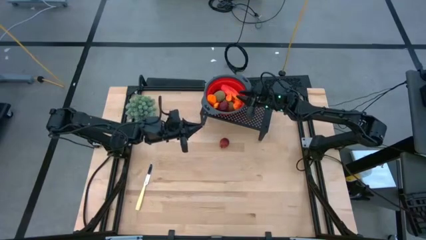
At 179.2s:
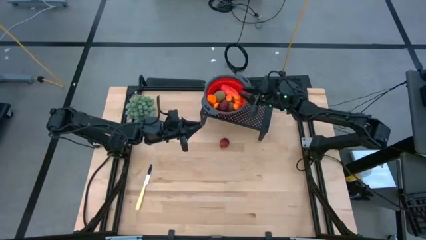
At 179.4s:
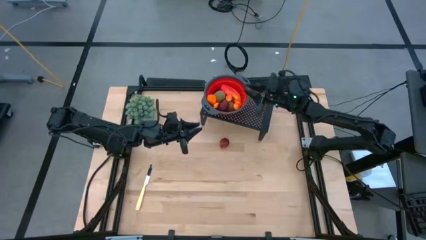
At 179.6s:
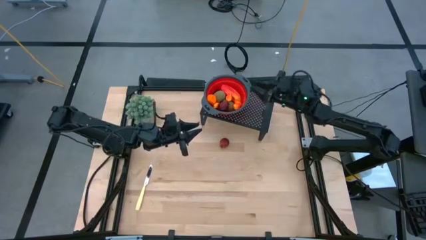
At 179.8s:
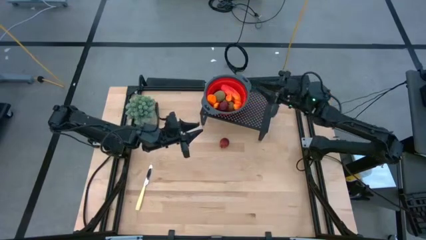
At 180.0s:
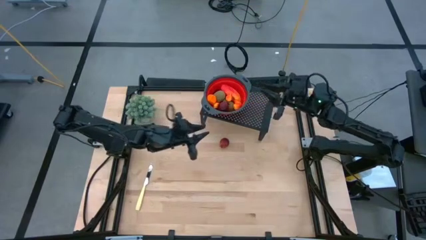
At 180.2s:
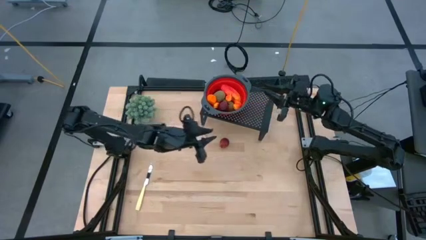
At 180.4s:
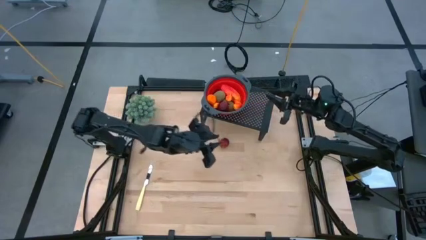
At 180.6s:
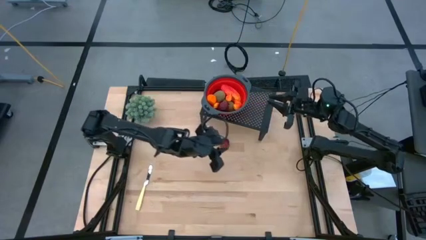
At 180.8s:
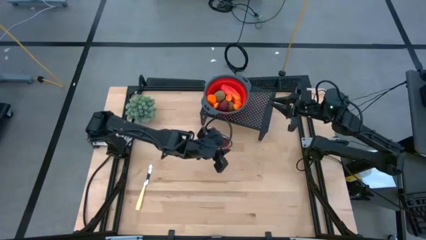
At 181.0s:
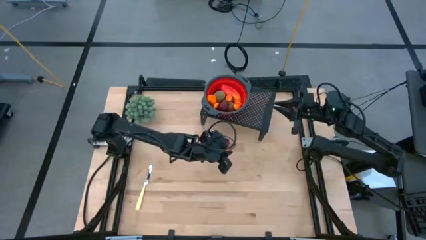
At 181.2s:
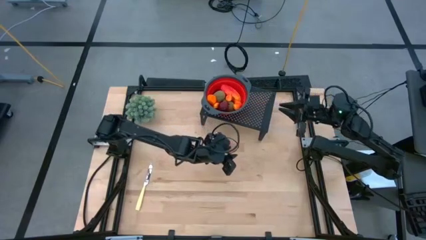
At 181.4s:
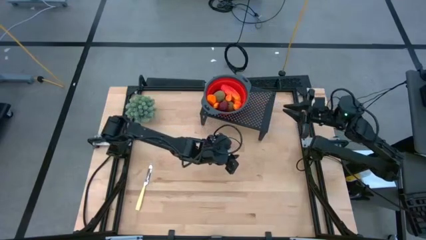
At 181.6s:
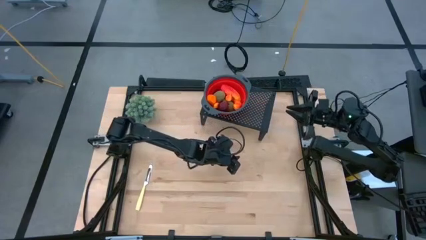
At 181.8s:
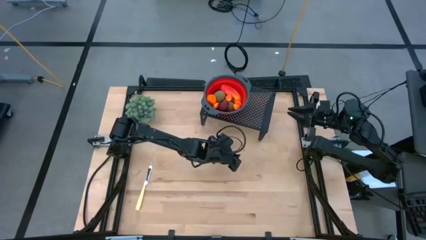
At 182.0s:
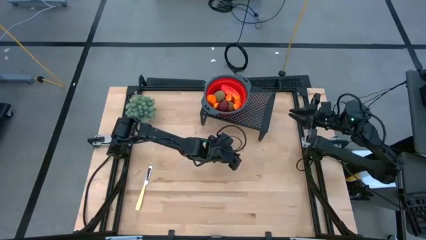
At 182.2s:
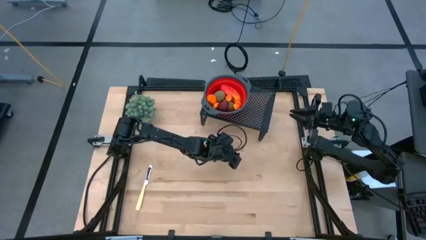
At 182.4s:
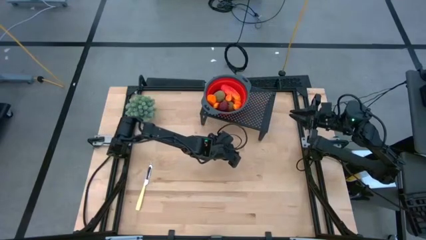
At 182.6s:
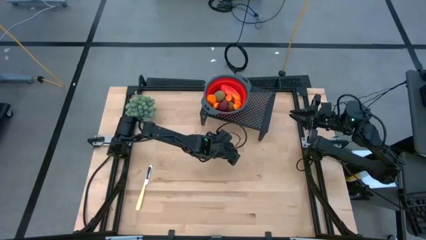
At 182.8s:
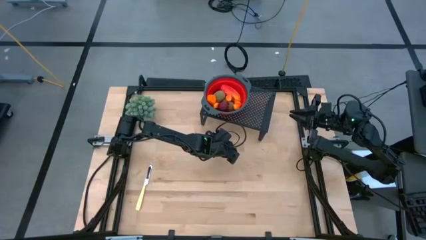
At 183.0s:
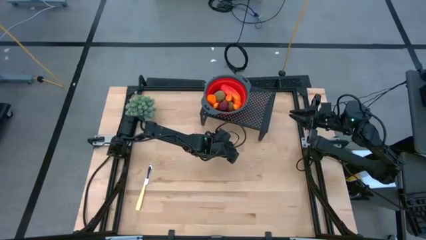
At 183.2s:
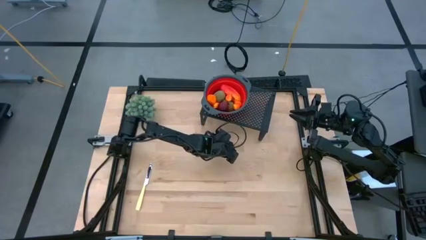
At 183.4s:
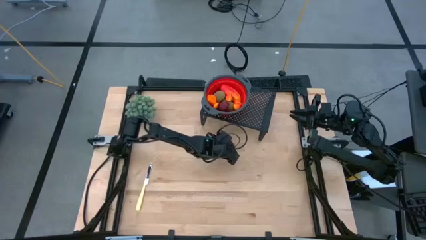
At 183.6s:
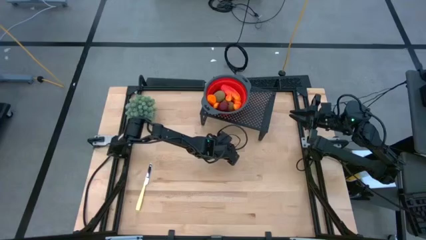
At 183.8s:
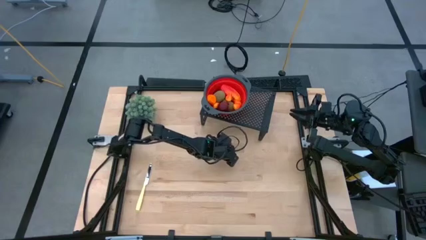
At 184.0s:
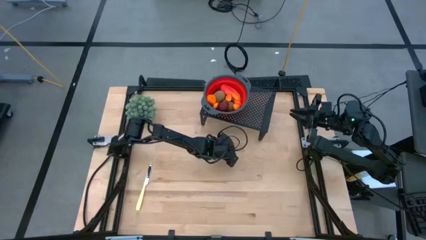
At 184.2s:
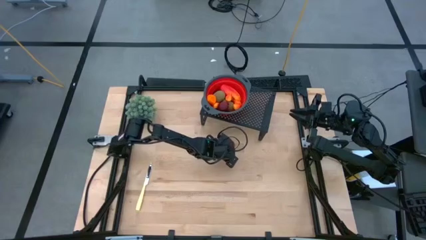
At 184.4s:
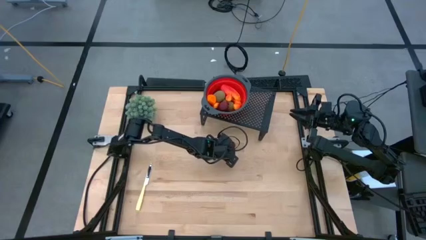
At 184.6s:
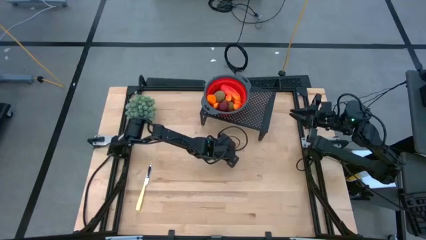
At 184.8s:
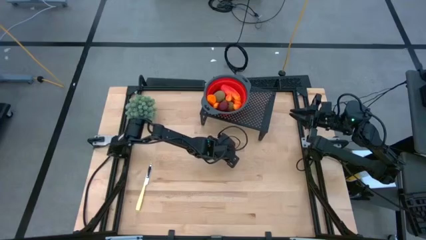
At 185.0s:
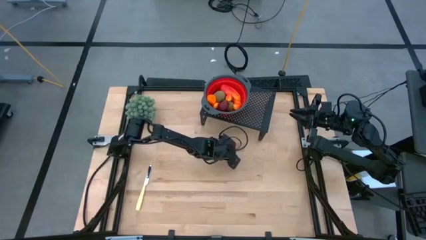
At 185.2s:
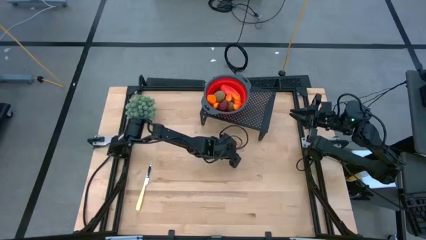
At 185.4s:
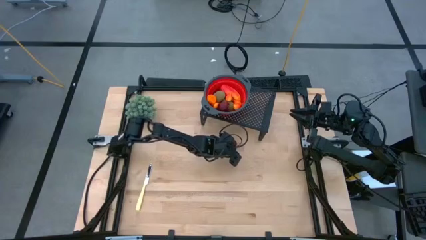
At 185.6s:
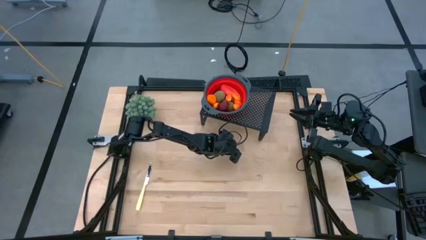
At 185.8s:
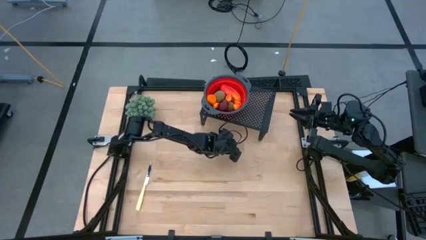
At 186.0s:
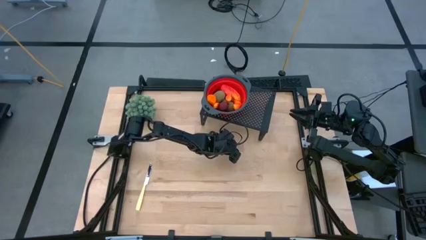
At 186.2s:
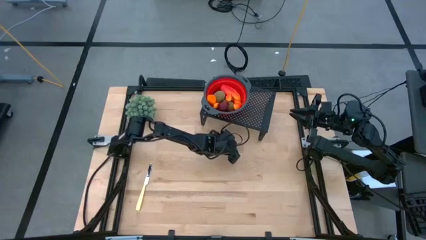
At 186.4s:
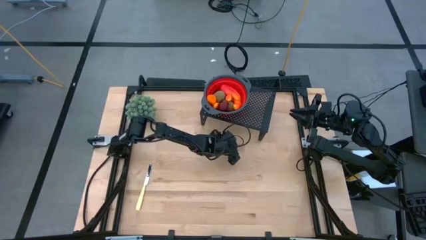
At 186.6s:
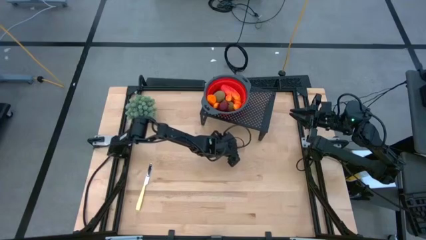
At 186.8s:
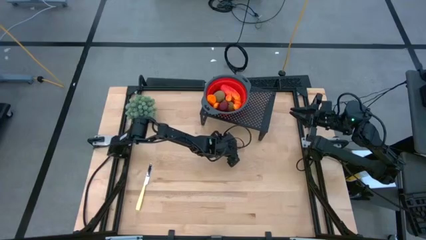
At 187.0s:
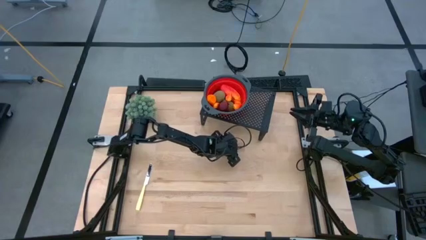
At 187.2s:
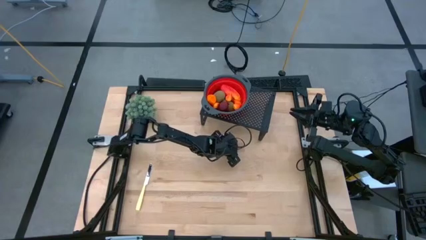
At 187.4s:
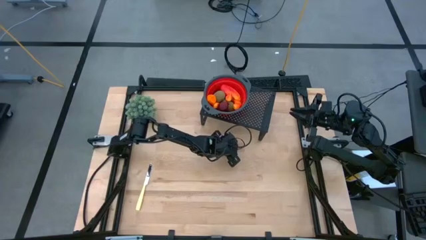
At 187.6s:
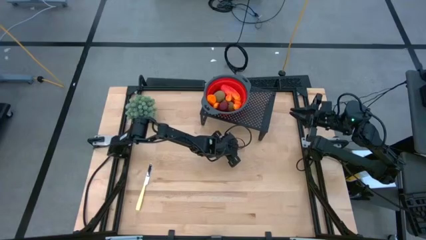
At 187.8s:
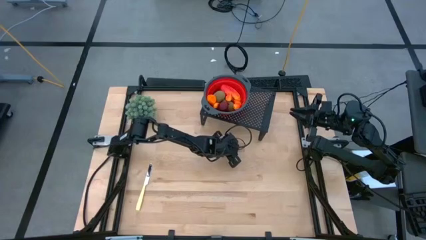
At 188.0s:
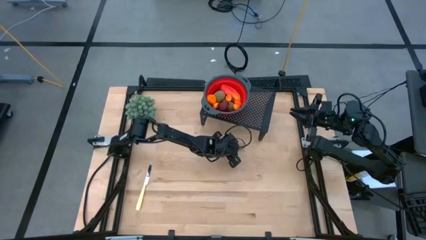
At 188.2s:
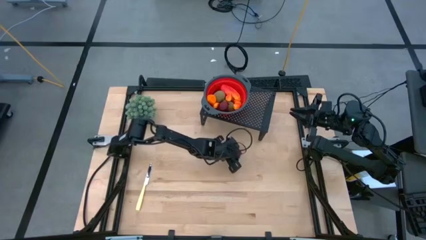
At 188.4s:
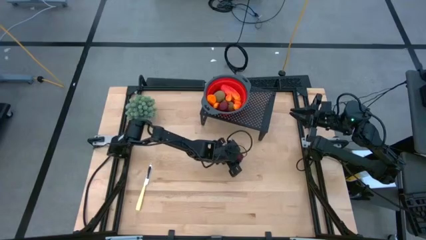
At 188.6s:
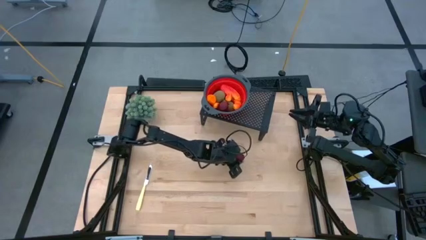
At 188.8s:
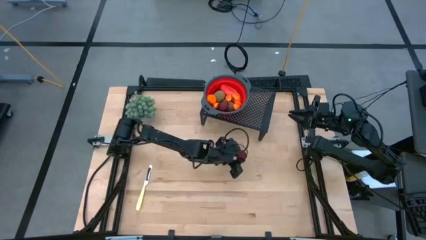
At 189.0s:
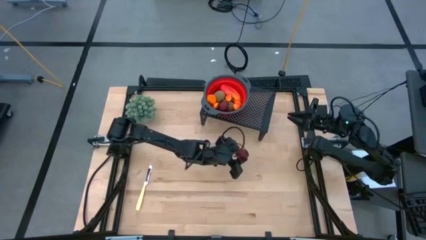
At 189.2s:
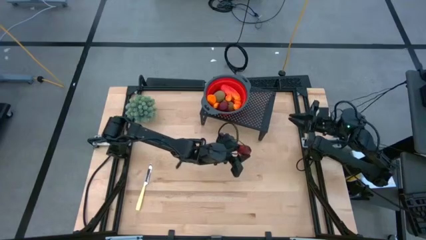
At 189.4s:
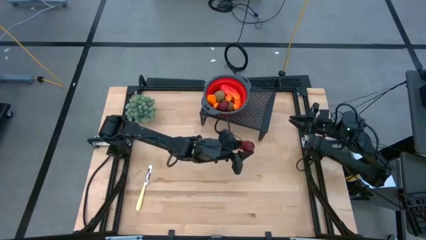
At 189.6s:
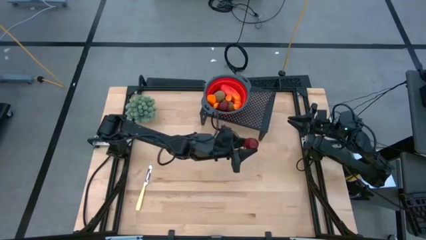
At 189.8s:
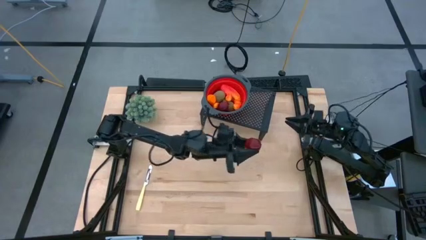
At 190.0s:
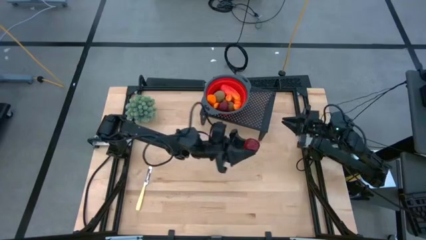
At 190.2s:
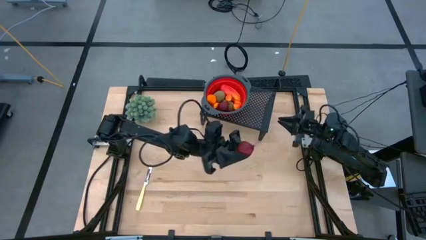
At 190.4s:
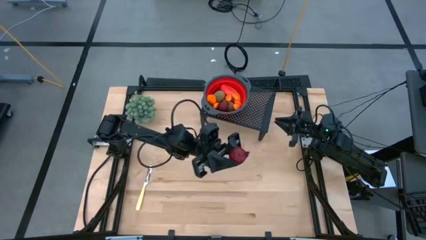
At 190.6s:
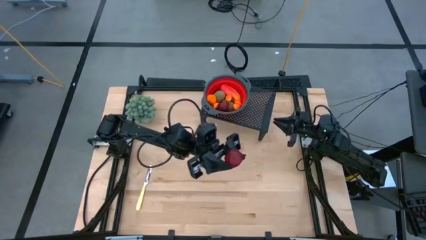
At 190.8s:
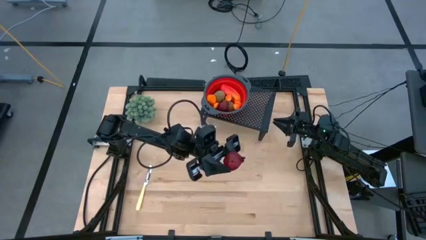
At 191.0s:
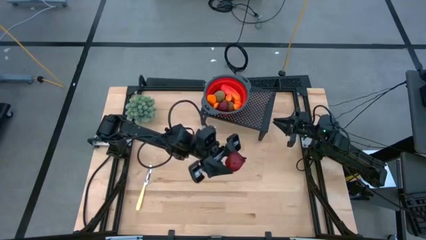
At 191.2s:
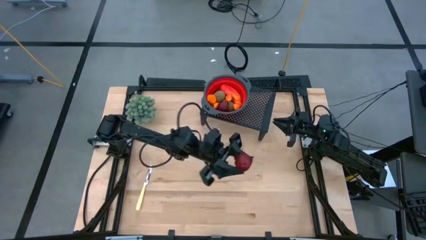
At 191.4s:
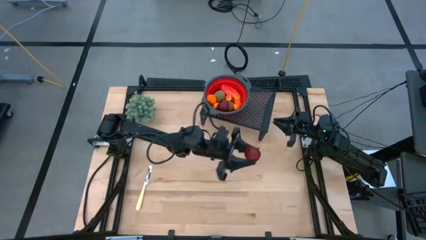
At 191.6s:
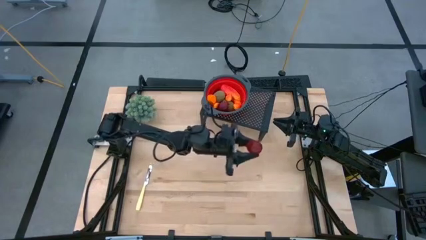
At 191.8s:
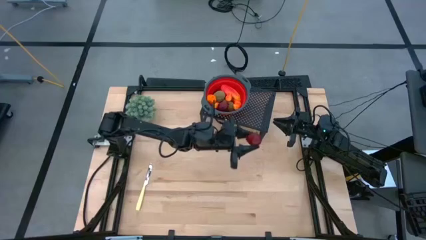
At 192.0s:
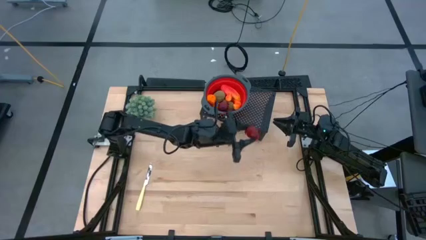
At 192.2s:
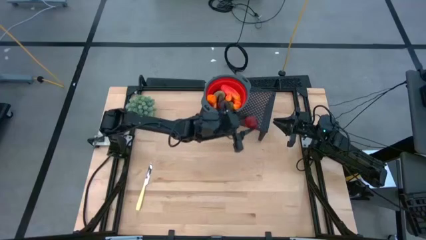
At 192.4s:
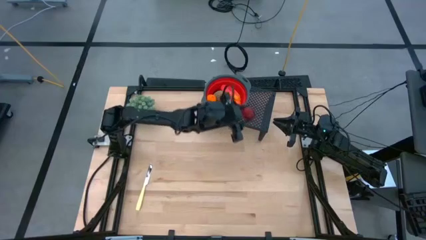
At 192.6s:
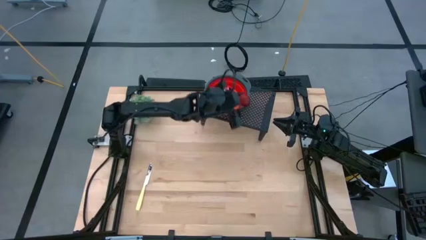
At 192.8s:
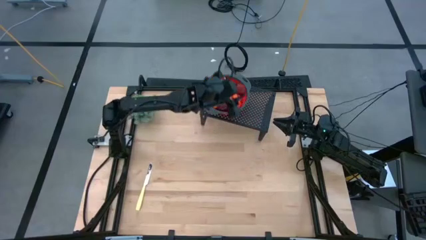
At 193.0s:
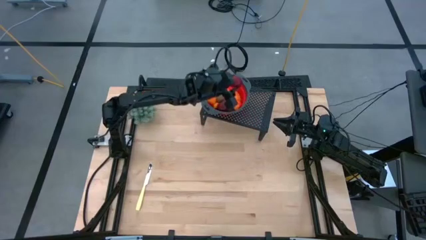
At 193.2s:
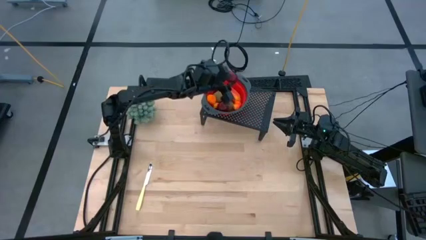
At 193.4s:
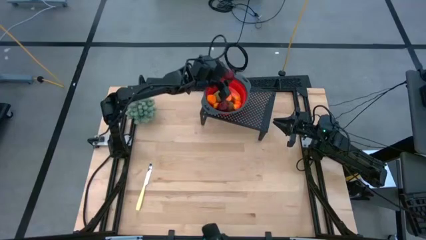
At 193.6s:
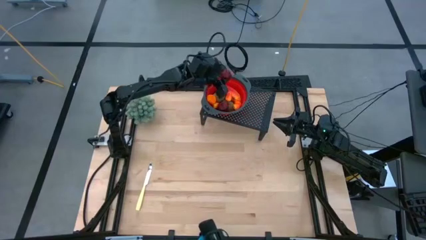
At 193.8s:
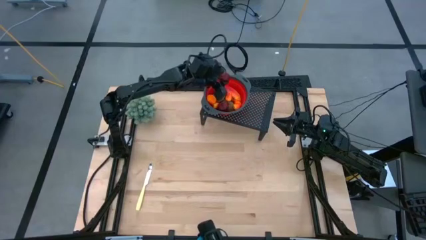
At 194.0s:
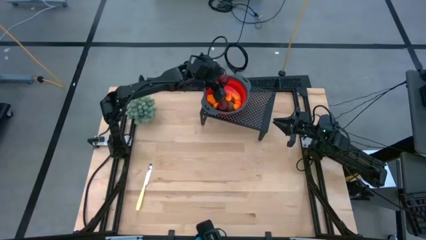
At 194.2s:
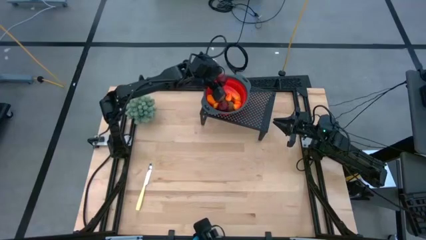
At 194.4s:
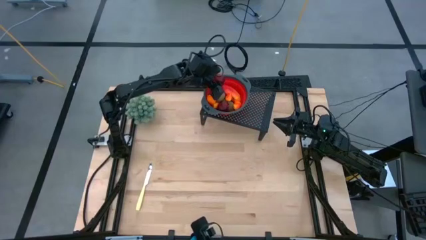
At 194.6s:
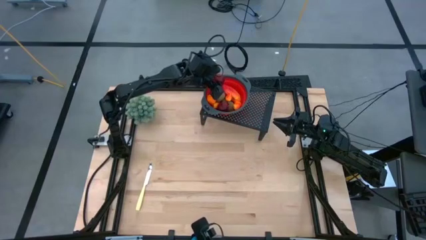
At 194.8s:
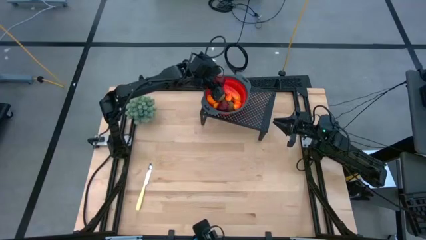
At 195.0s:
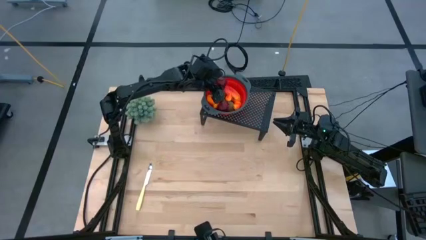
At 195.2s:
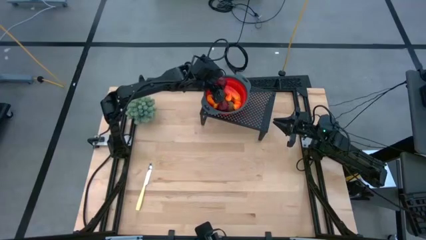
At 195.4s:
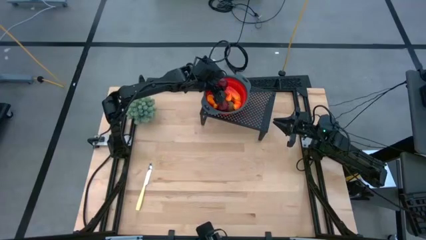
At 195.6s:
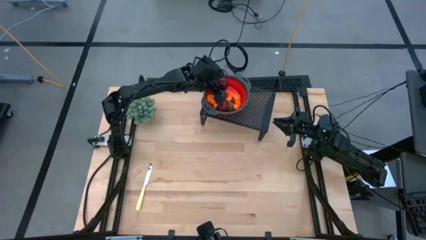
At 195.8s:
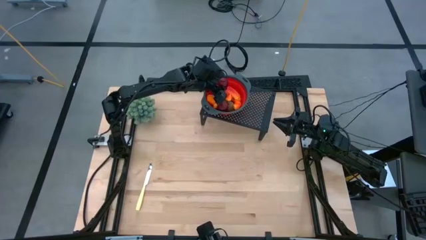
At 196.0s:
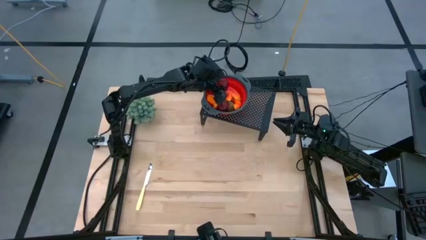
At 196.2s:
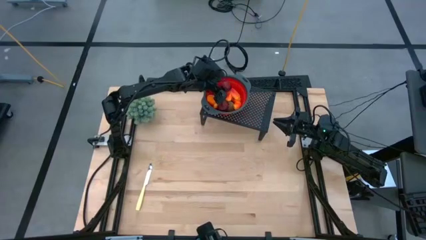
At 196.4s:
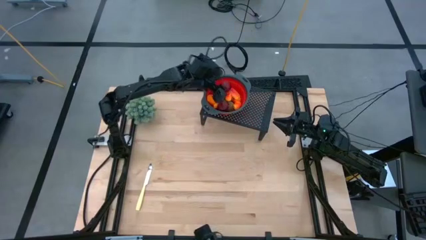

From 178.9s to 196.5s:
Task: Pick & Place Fruit
Put the pomegranate into the red strainer bowl on the shelf
